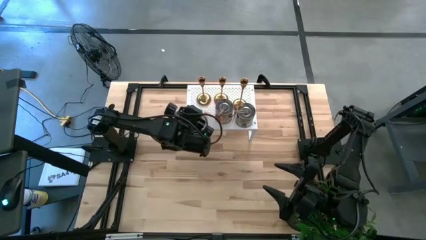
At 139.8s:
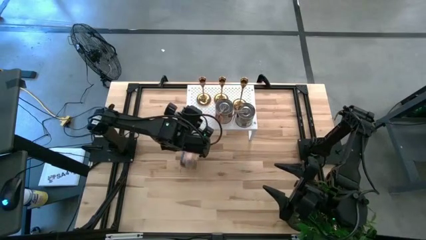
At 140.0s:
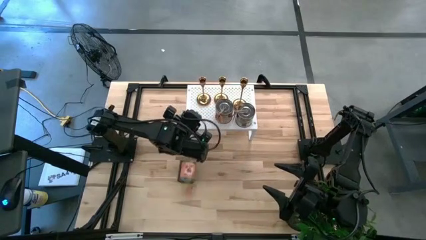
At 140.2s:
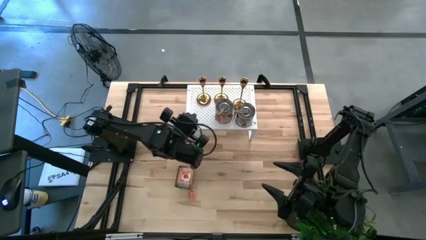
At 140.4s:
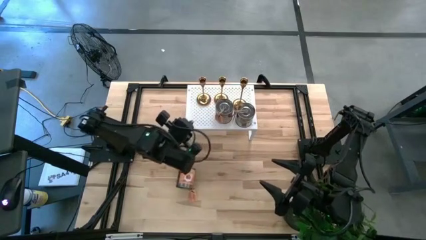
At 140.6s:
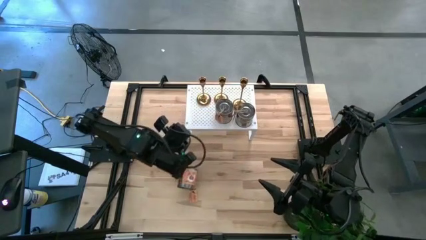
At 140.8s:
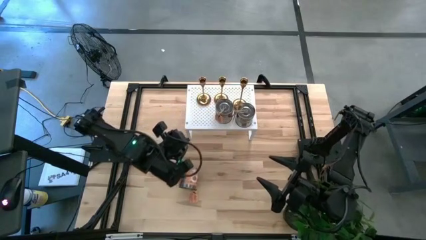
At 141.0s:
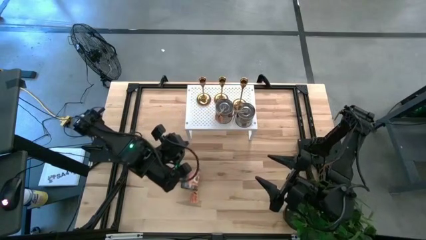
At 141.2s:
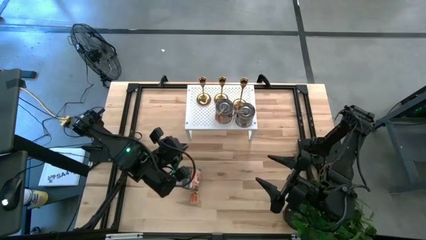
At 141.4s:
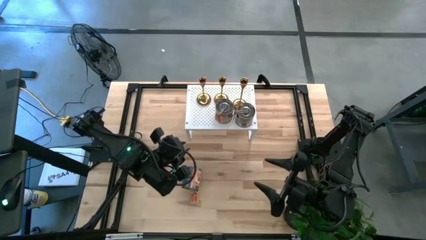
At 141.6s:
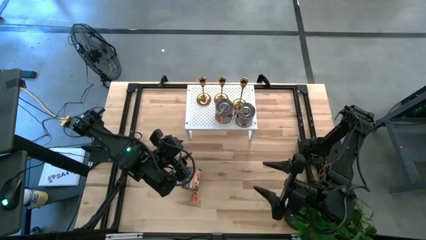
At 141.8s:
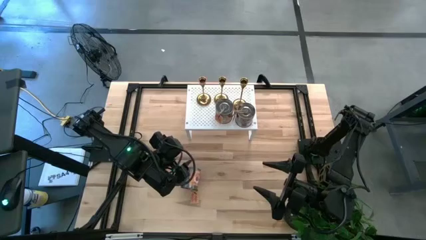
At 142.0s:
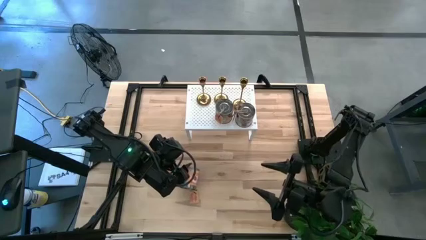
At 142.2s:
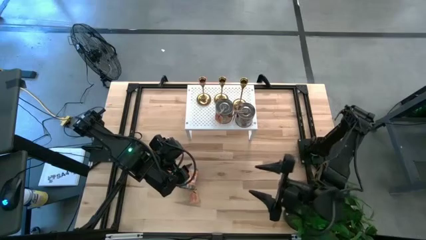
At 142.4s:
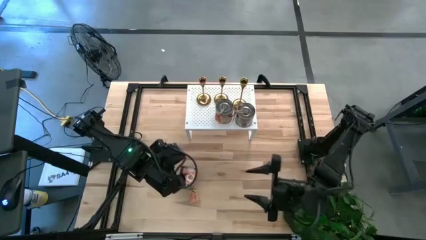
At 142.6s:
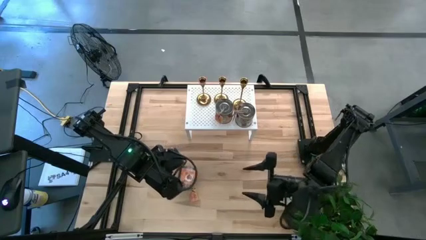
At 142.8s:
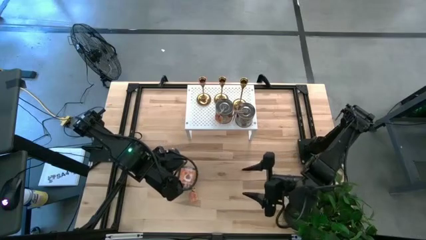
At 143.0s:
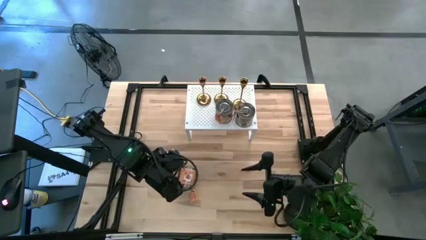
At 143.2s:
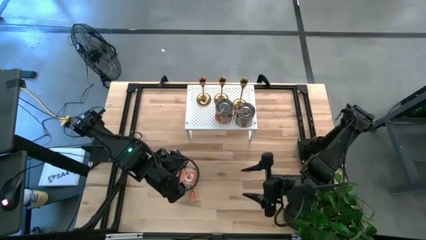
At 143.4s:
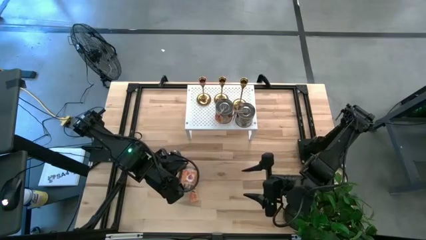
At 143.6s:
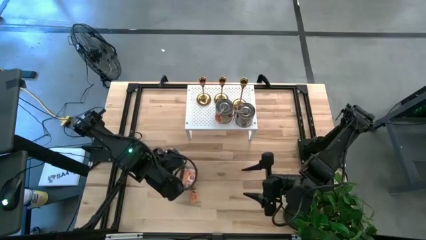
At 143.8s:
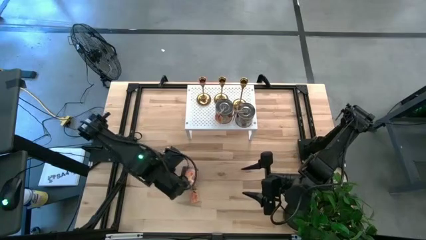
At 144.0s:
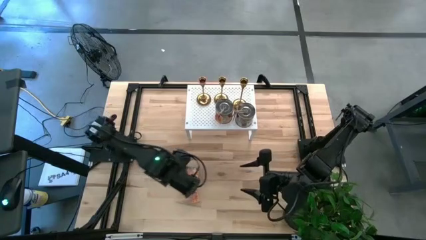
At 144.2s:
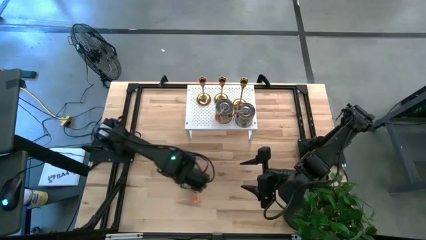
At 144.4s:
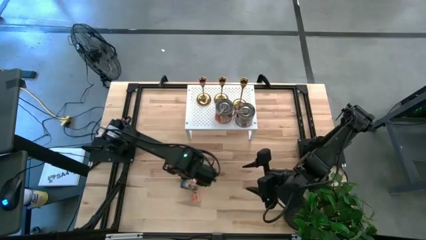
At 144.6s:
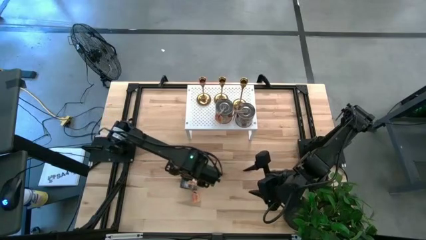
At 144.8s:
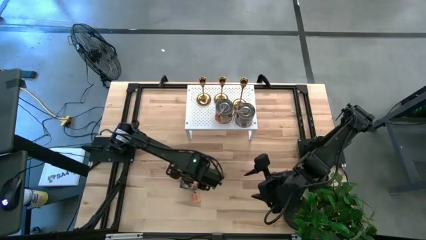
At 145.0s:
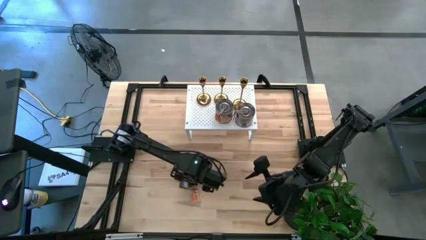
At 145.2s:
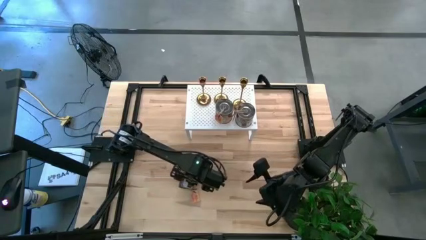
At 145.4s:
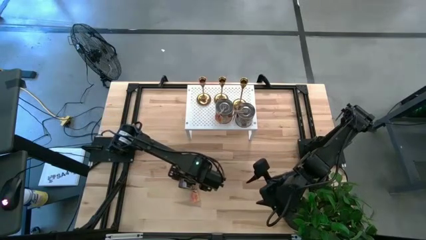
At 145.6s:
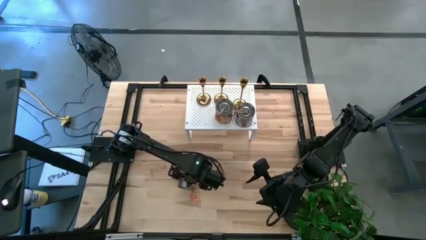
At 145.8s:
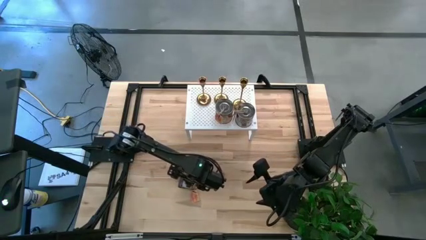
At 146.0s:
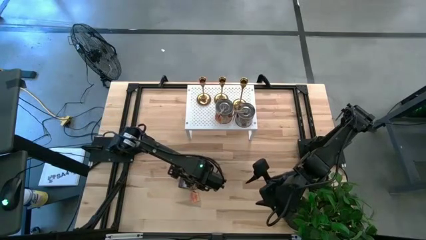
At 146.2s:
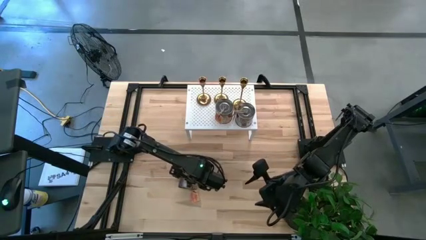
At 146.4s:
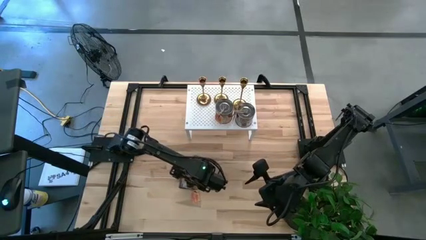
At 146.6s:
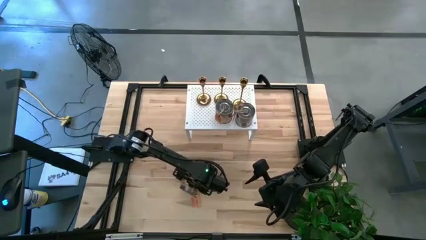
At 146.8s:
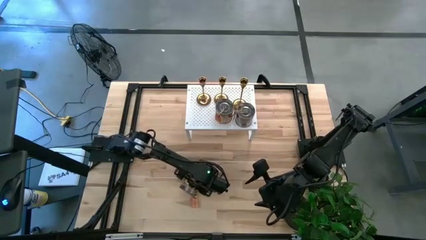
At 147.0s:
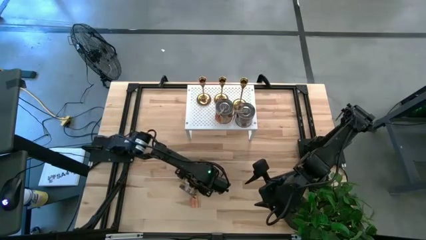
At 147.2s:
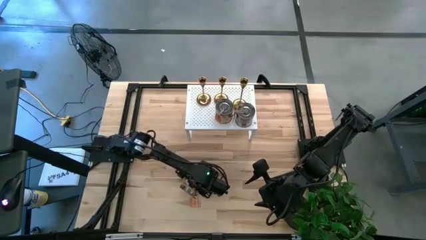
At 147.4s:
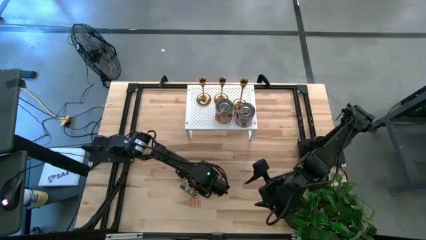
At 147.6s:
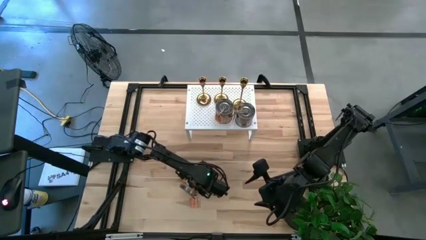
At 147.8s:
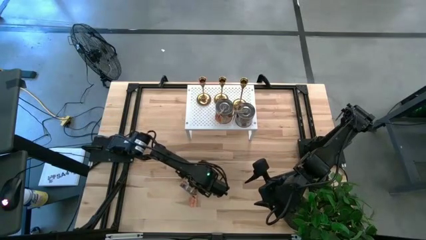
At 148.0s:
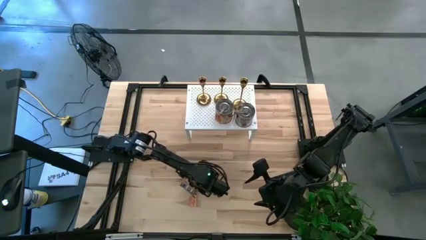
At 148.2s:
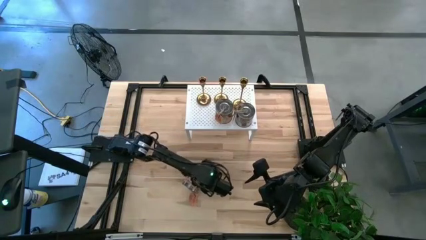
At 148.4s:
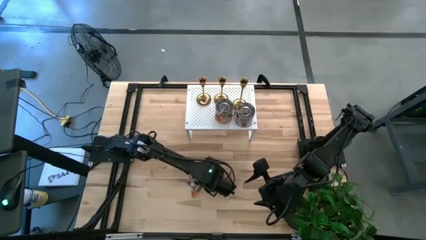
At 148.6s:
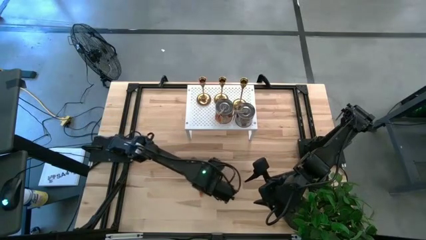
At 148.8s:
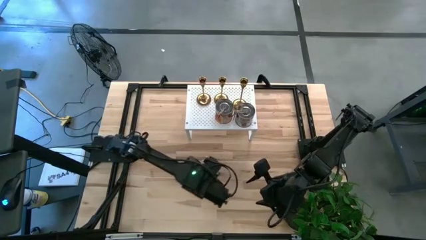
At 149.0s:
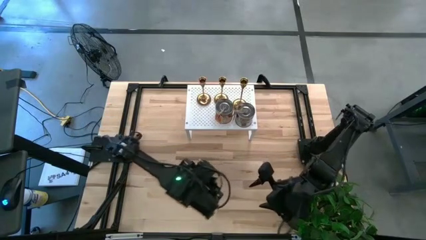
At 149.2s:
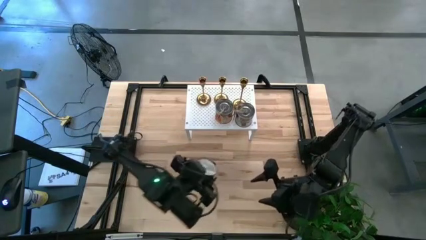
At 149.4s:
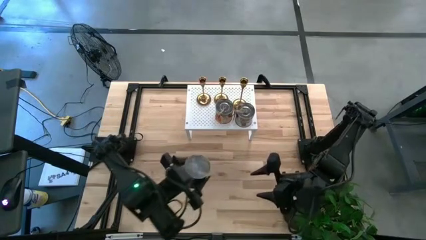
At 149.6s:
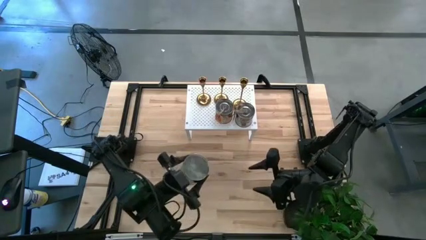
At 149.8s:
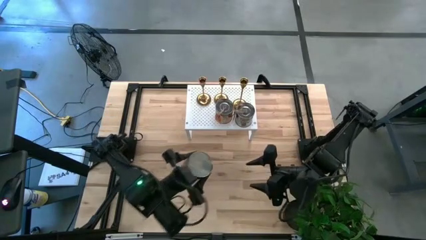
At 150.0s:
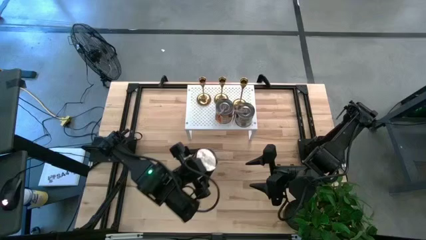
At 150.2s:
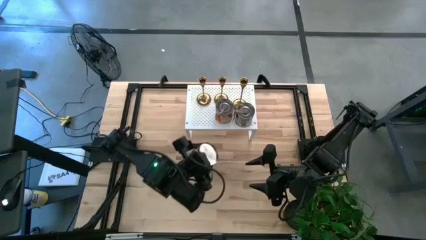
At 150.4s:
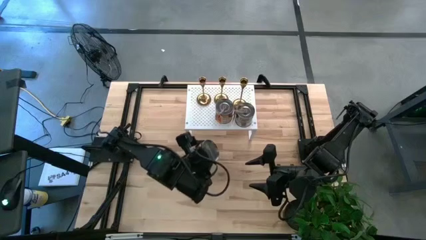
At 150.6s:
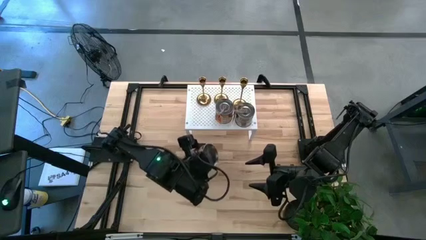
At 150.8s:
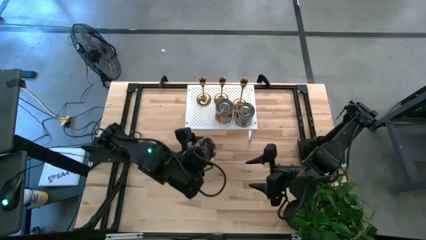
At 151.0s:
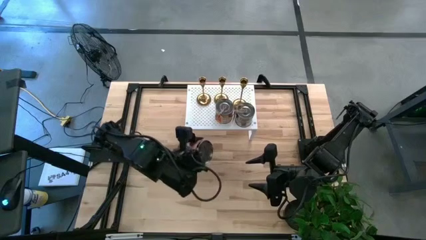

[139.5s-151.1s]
Task: Pick & Place candle stick holders
Put the silver scented candle on the shelf aligned with the other silver scented candles

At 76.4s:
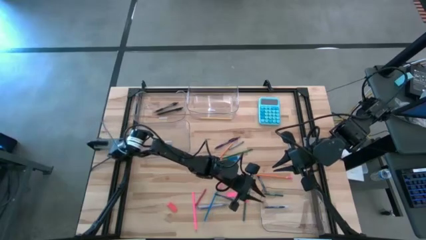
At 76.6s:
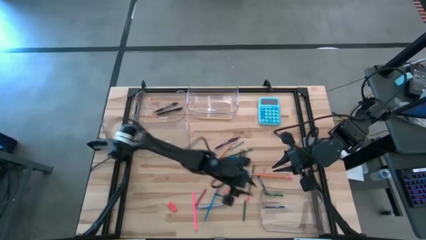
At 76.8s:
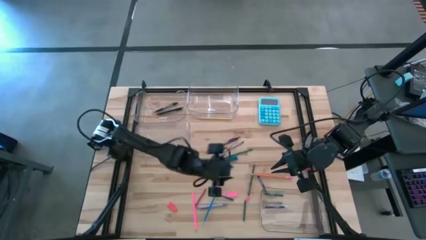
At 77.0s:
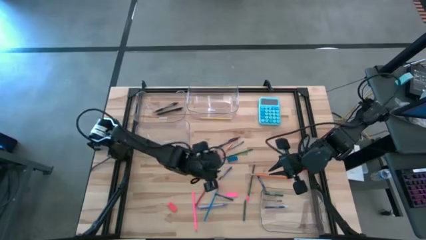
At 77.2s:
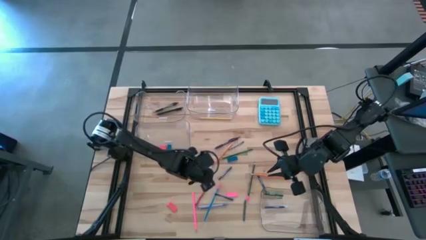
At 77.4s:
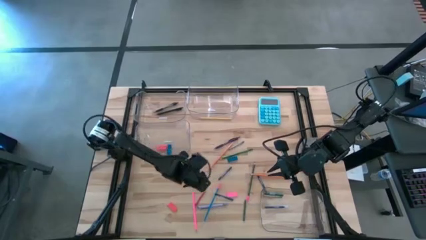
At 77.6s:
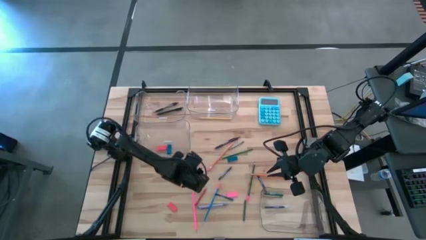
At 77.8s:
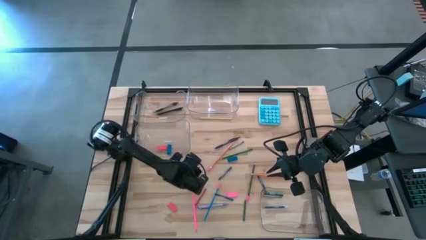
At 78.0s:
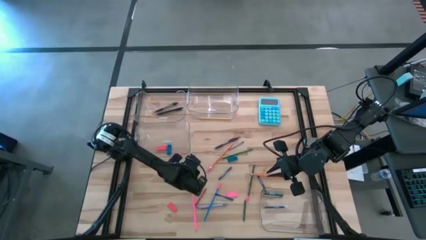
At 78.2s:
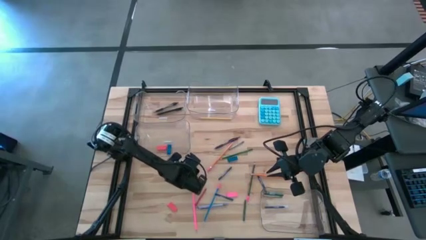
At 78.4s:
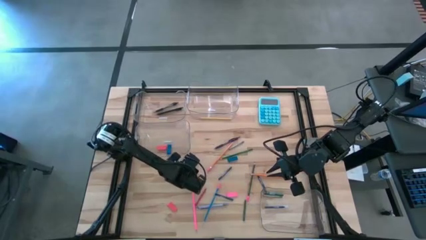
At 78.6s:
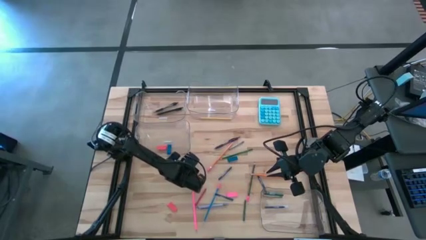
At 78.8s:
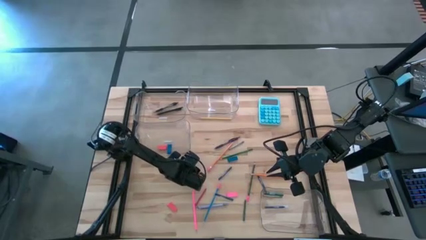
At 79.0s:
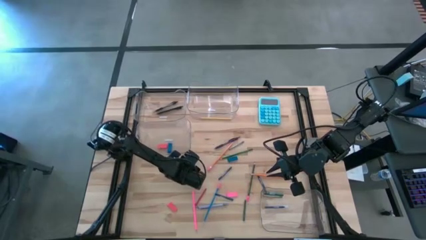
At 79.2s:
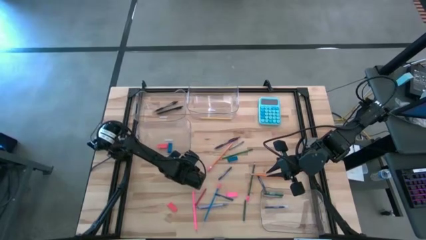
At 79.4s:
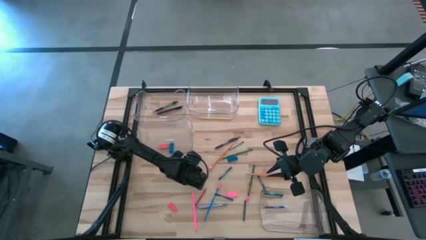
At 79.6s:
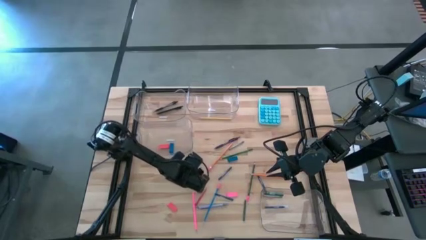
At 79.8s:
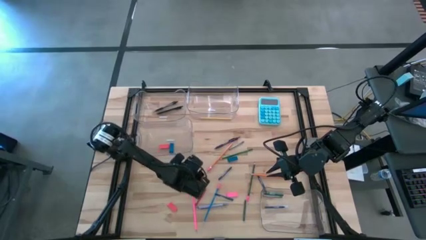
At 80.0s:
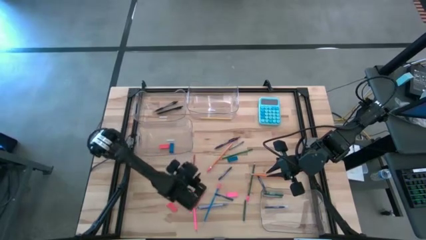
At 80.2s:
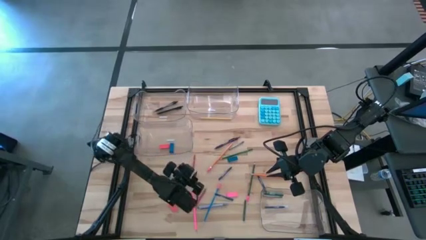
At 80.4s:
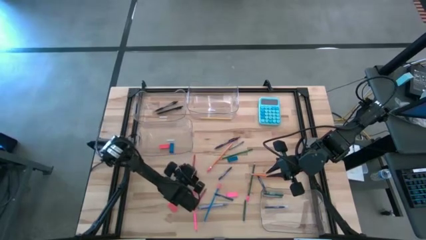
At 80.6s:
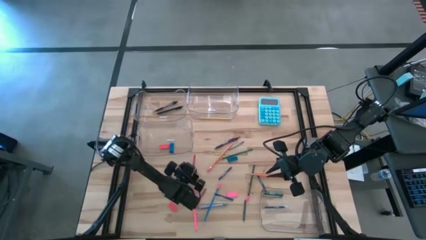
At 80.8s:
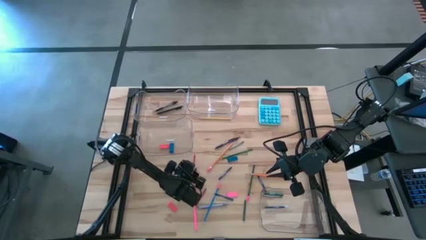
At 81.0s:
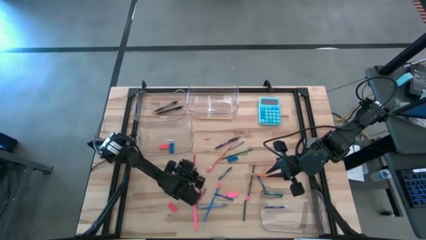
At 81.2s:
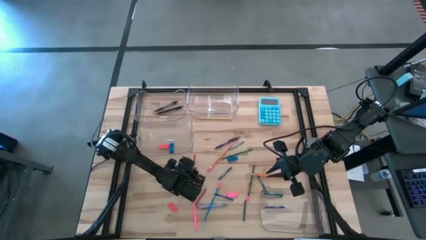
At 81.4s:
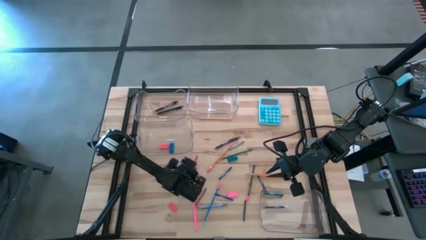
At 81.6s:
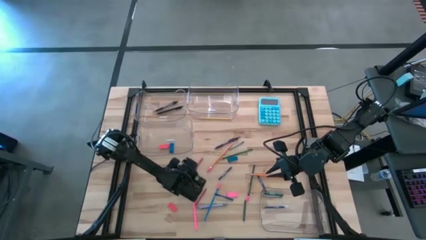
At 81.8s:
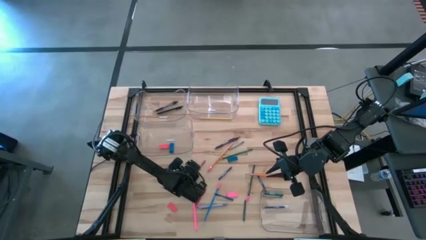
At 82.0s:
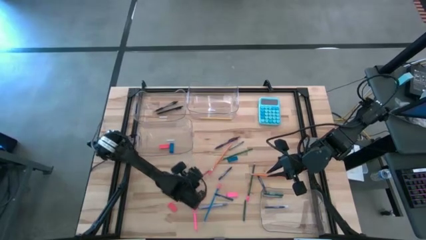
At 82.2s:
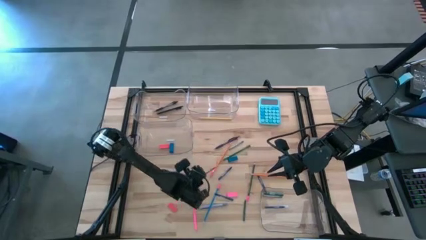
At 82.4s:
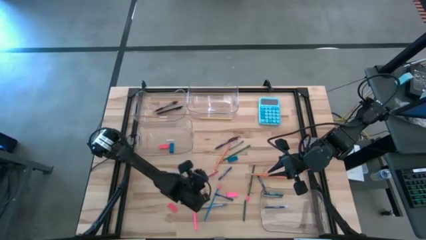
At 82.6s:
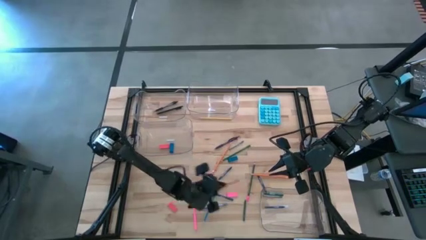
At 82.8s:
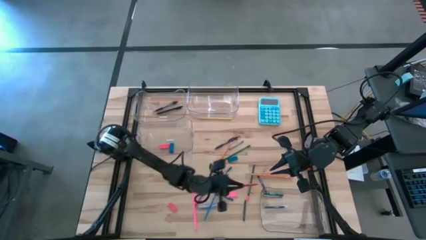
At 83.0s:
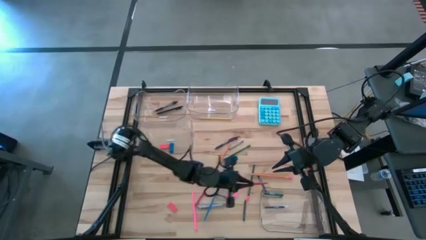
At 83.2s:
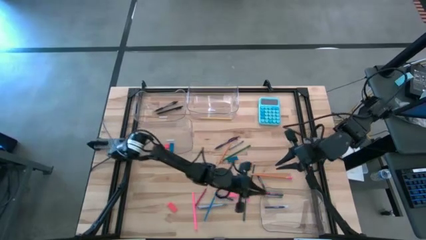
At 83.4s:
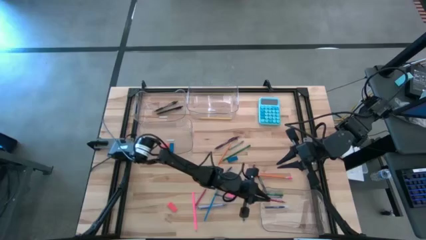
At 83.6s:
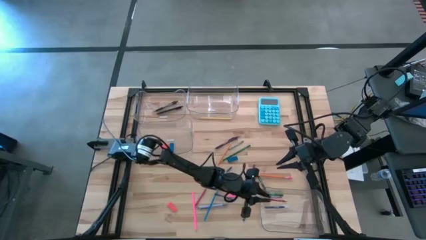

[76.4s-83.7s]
Task: Sort crayons/erasers/pens/pencils in bins
Put the red crayon into the bottom right transparent bin
